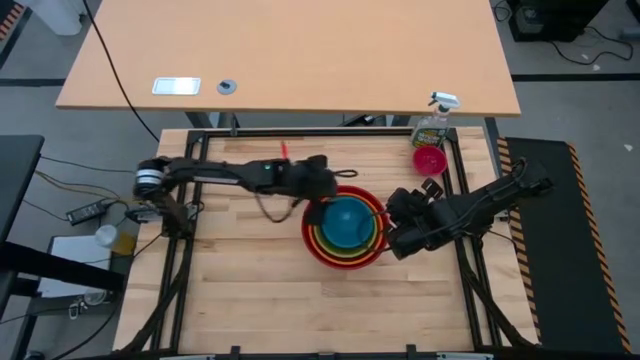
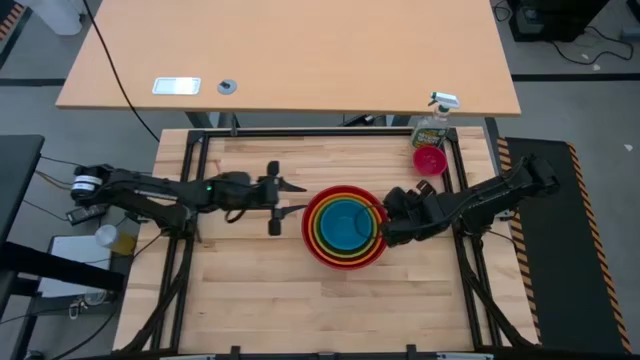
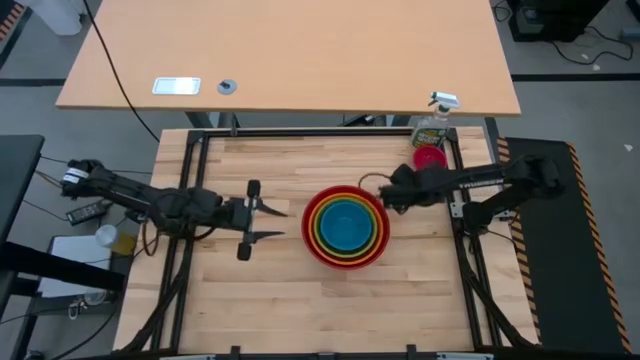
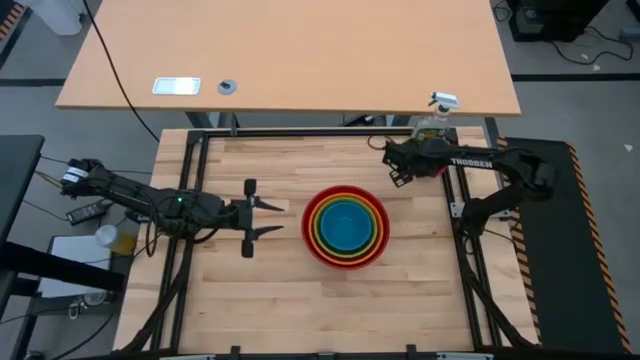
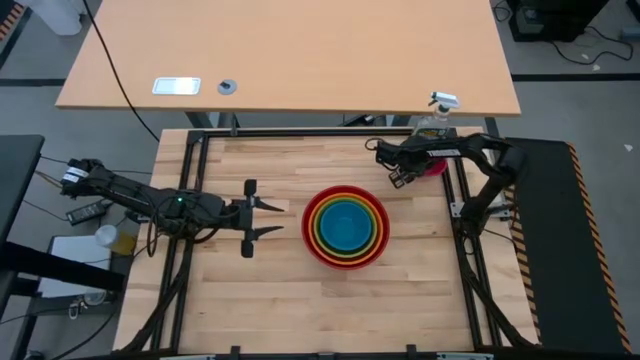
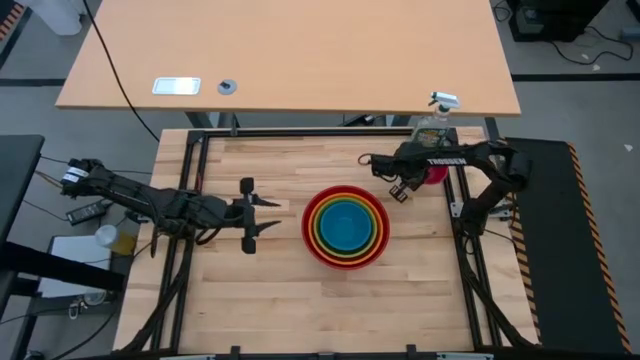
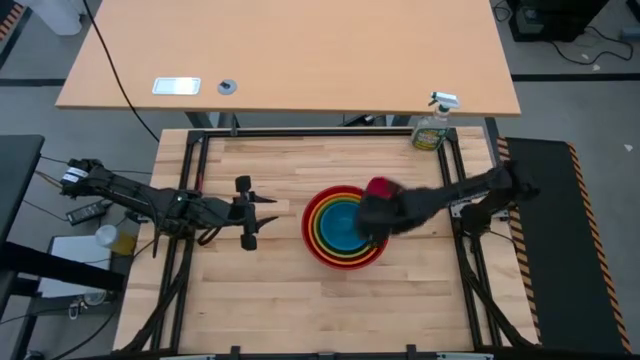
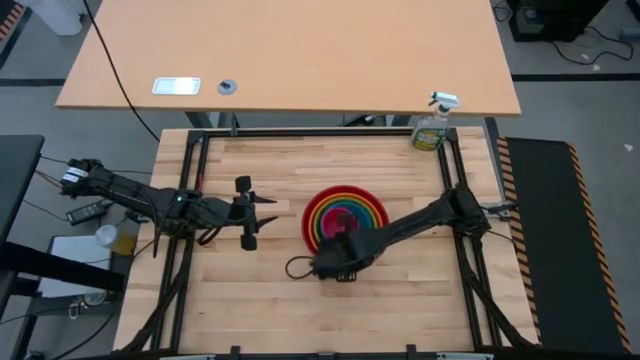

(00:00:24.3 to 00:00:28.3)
Stack the pink bowl on the blue bowl

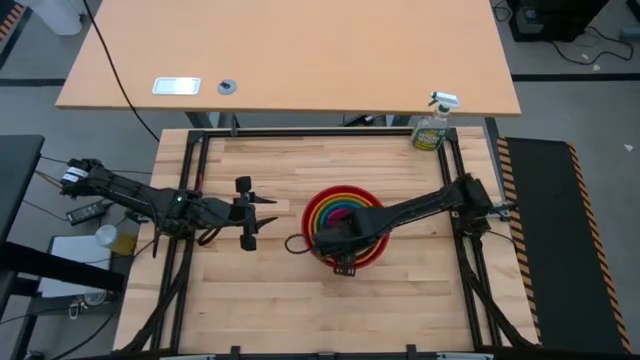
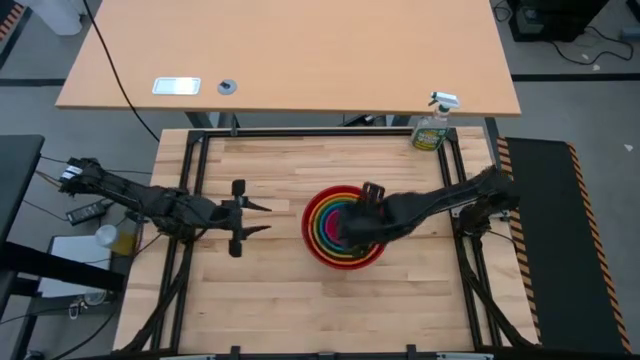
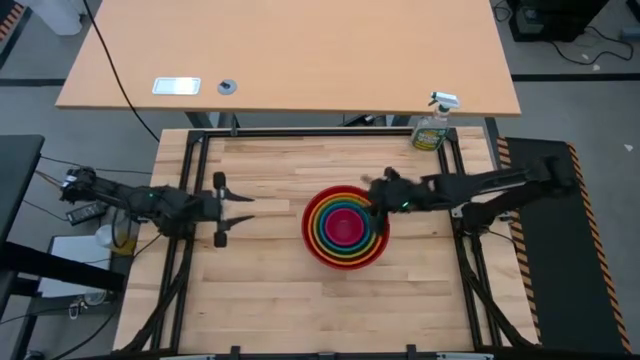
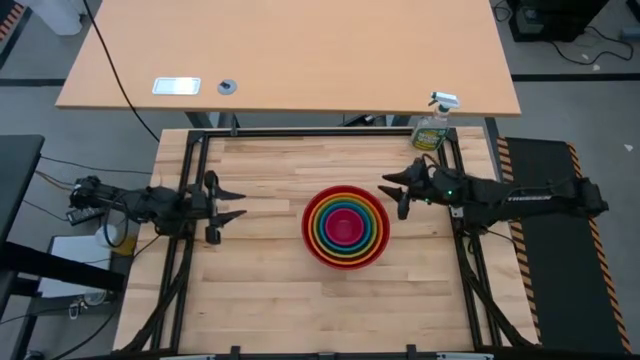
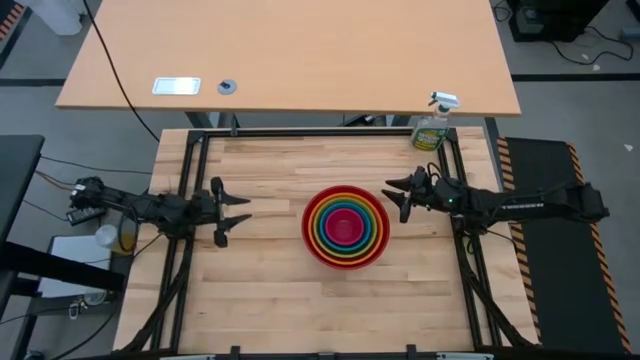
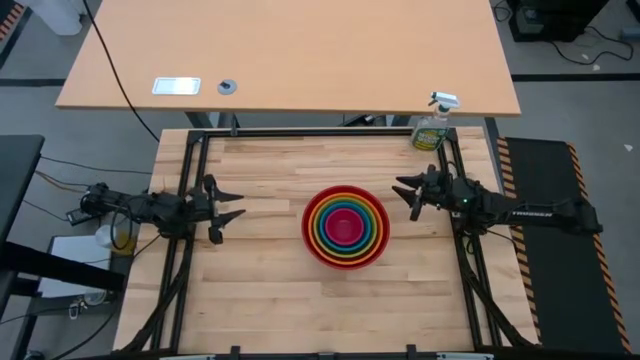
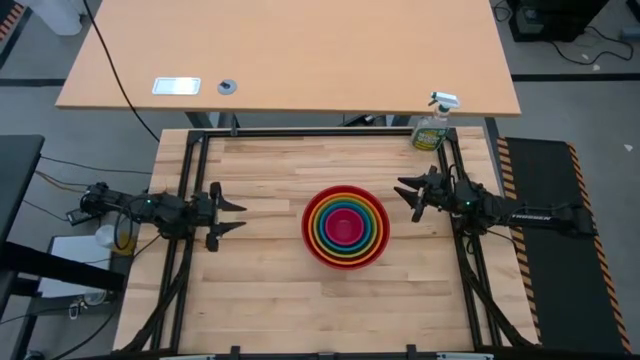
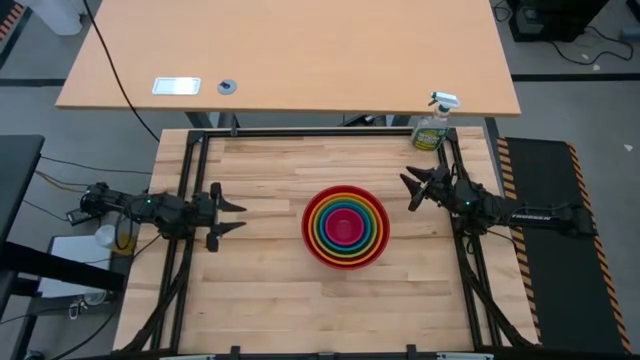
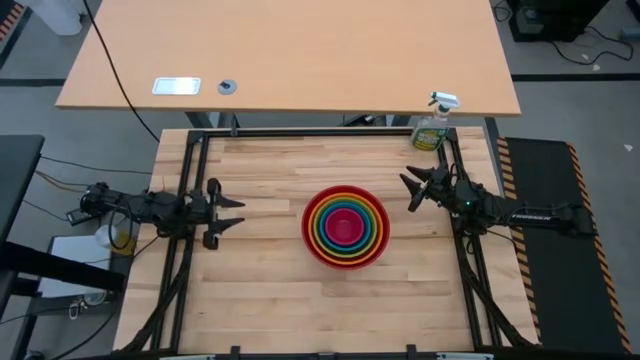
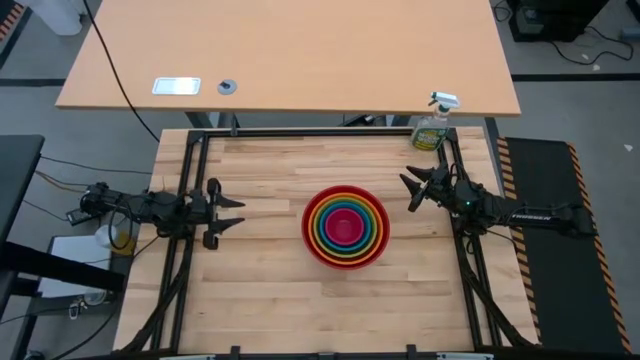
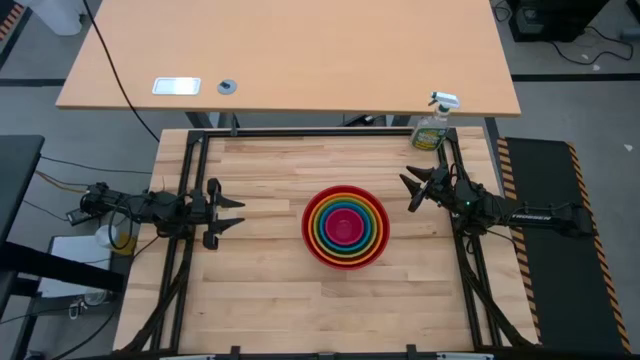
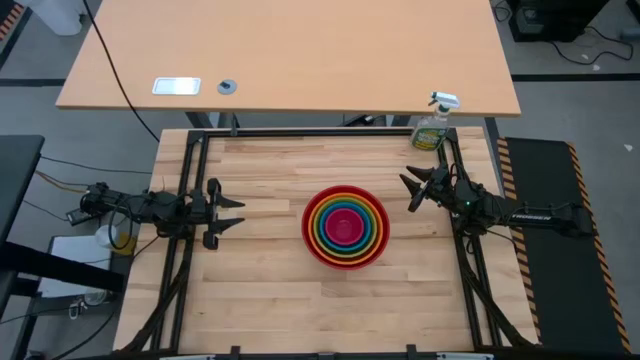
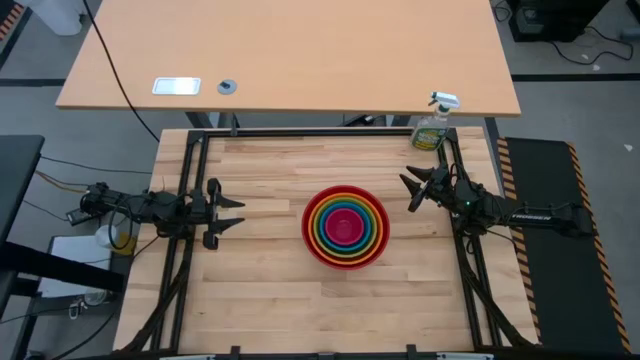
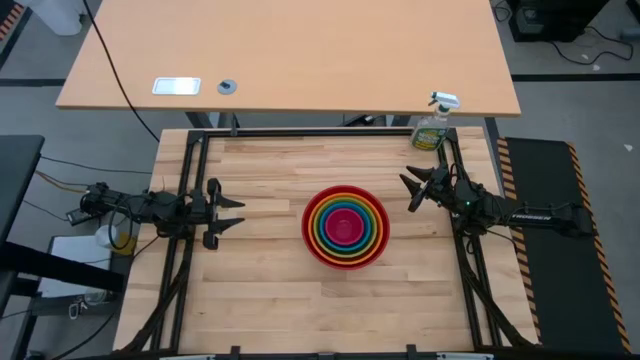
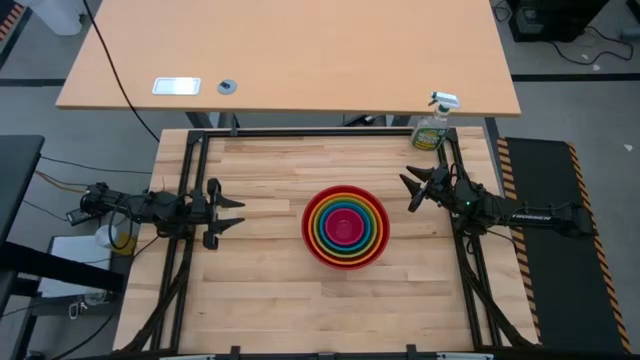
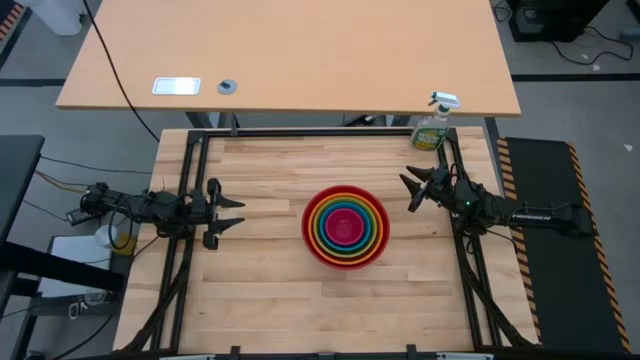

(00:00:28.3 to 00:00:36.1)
Return to Home Position
